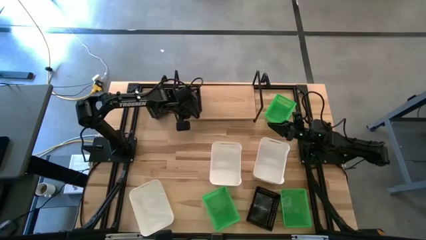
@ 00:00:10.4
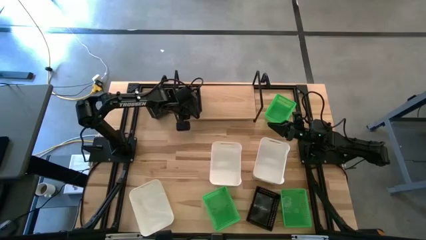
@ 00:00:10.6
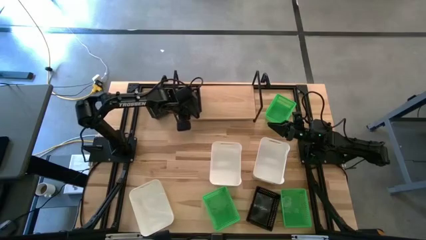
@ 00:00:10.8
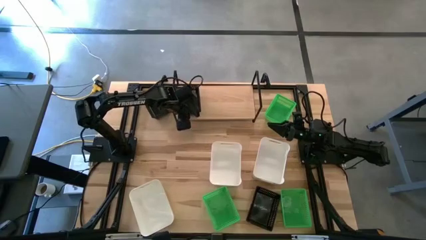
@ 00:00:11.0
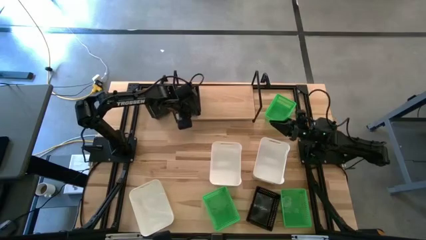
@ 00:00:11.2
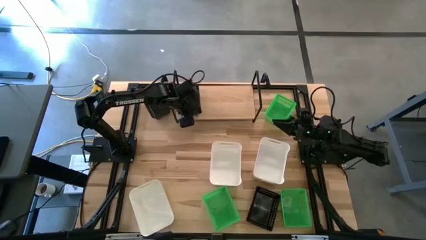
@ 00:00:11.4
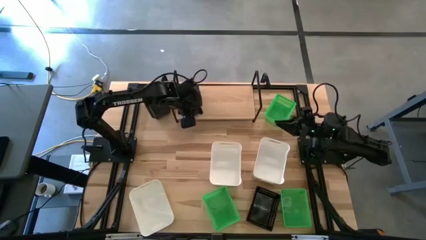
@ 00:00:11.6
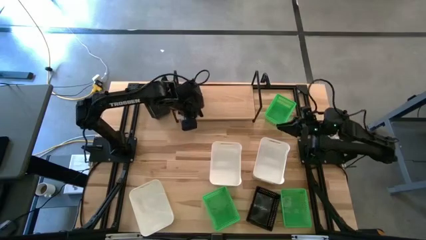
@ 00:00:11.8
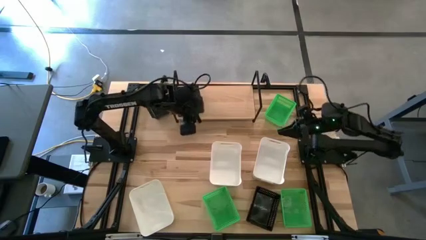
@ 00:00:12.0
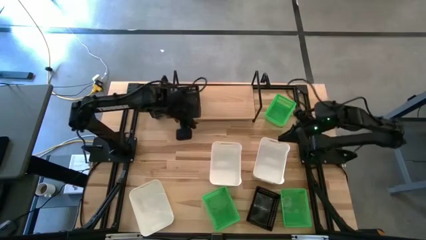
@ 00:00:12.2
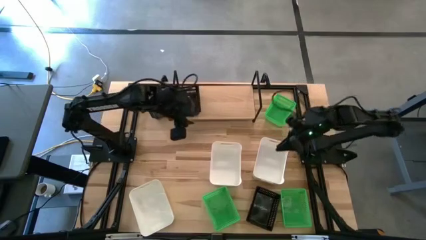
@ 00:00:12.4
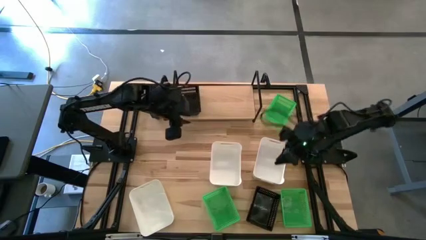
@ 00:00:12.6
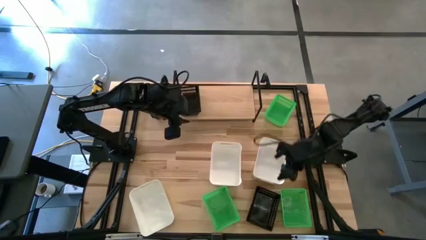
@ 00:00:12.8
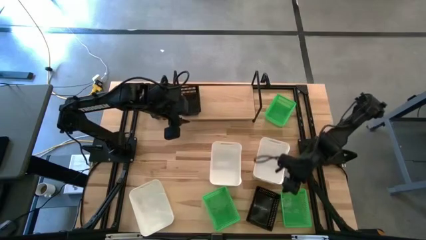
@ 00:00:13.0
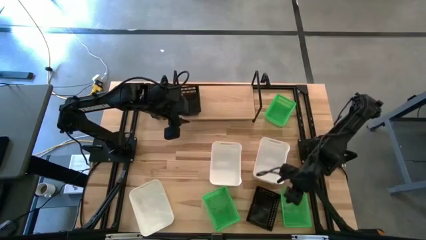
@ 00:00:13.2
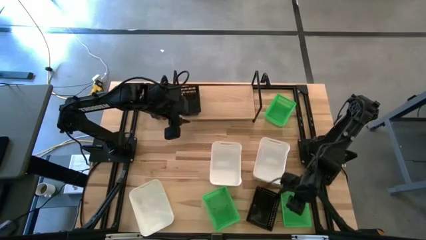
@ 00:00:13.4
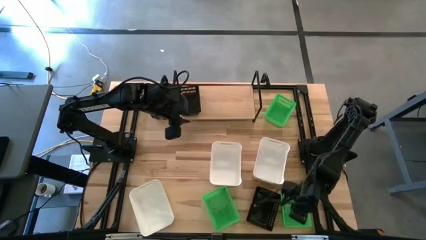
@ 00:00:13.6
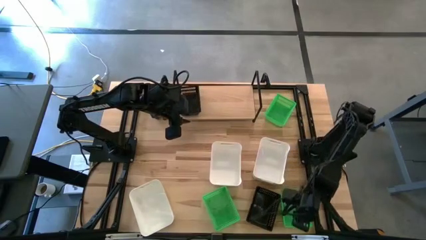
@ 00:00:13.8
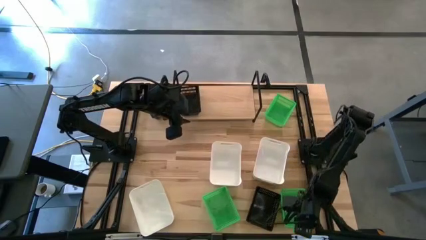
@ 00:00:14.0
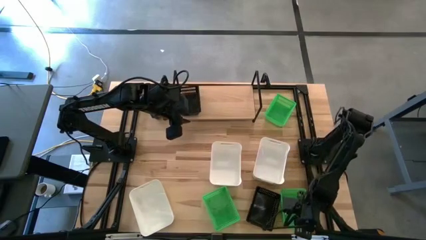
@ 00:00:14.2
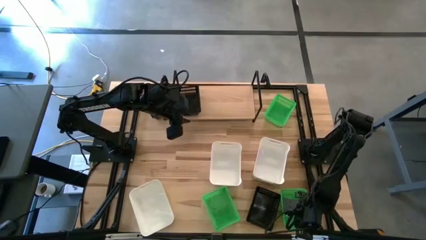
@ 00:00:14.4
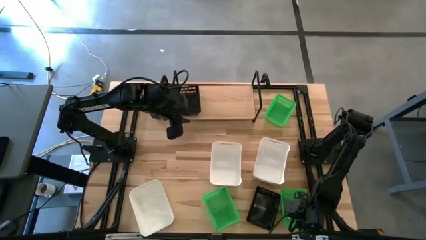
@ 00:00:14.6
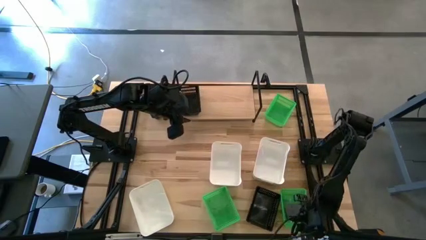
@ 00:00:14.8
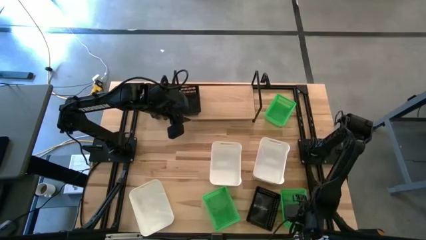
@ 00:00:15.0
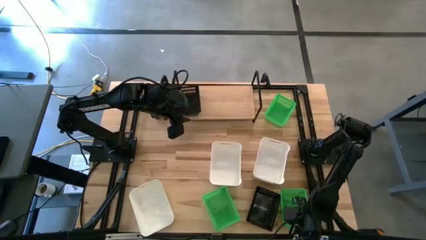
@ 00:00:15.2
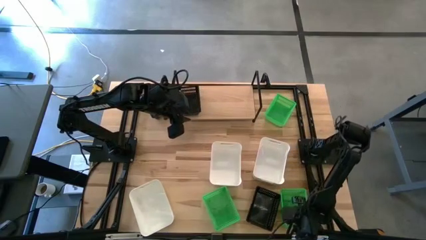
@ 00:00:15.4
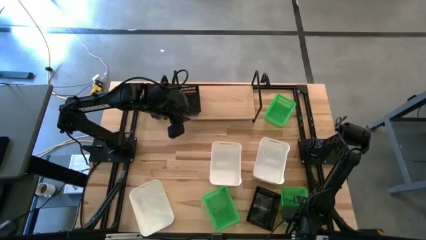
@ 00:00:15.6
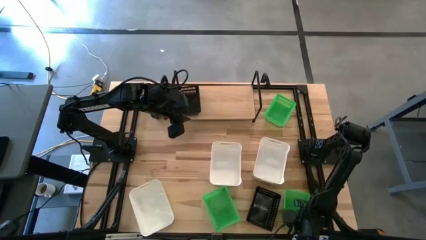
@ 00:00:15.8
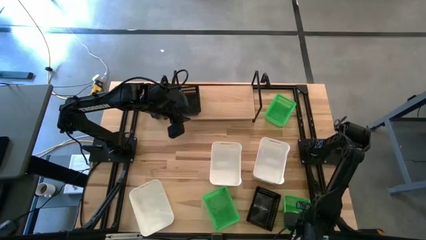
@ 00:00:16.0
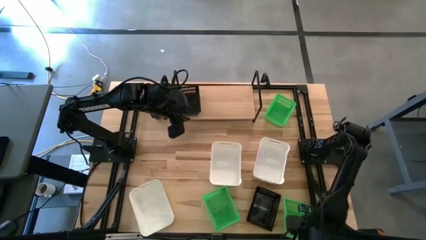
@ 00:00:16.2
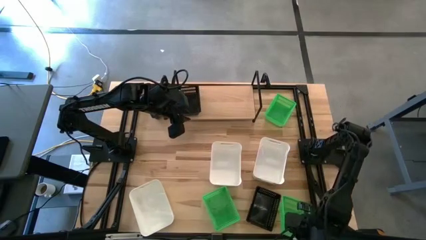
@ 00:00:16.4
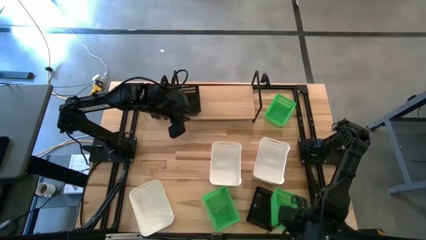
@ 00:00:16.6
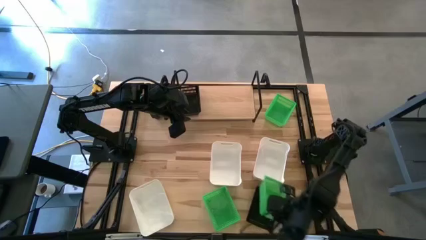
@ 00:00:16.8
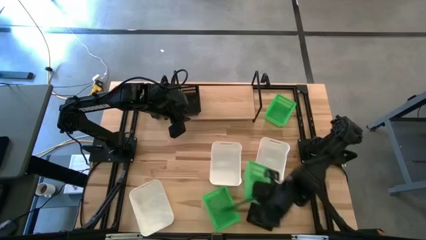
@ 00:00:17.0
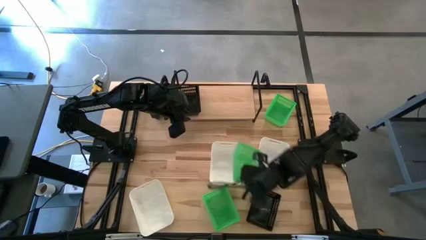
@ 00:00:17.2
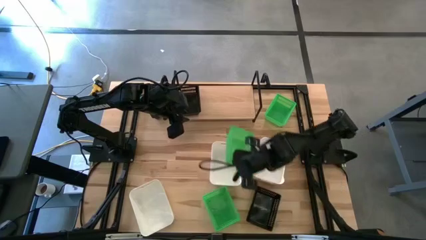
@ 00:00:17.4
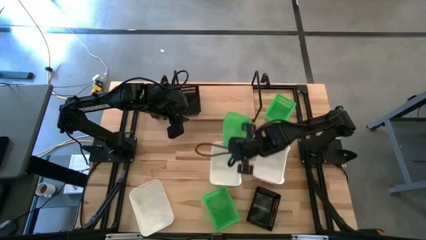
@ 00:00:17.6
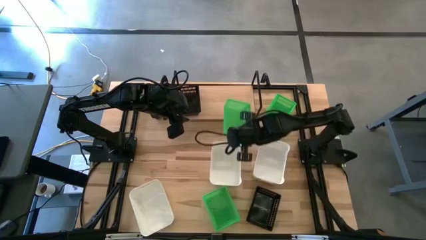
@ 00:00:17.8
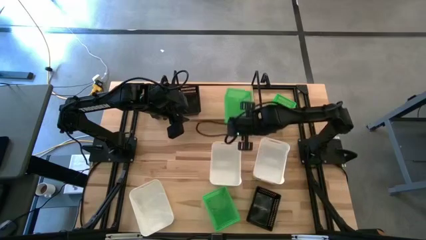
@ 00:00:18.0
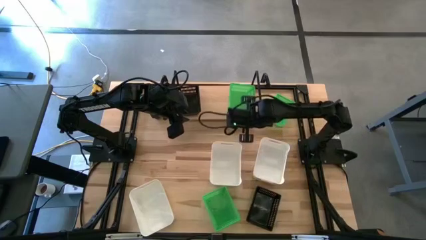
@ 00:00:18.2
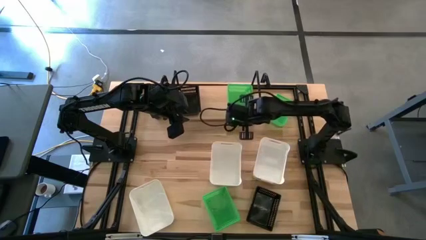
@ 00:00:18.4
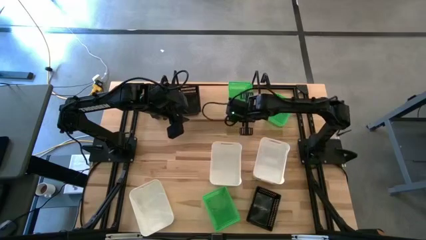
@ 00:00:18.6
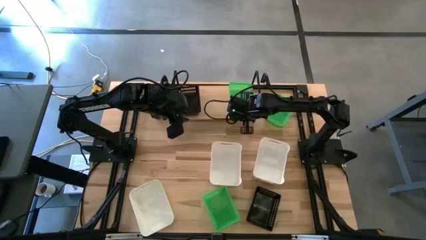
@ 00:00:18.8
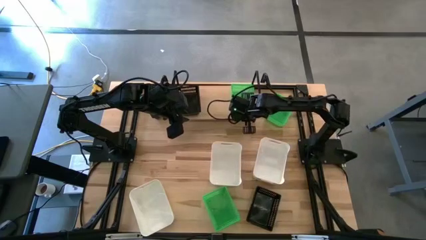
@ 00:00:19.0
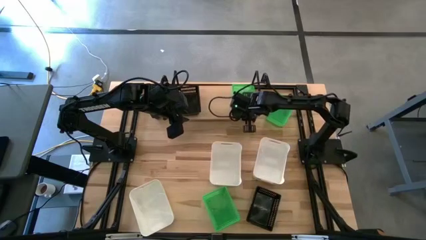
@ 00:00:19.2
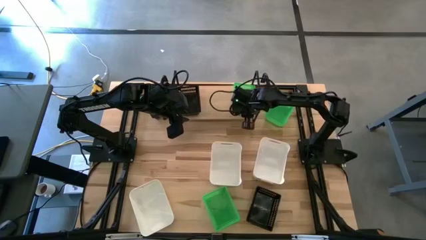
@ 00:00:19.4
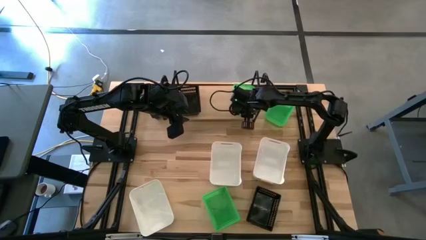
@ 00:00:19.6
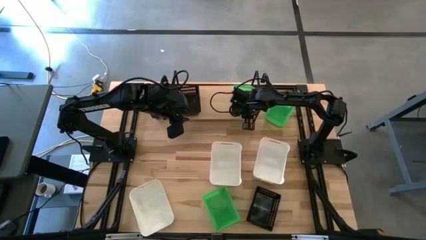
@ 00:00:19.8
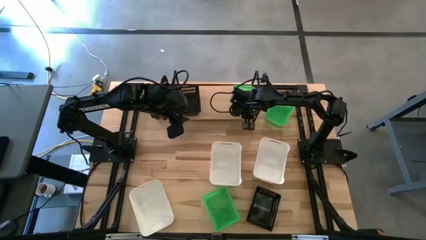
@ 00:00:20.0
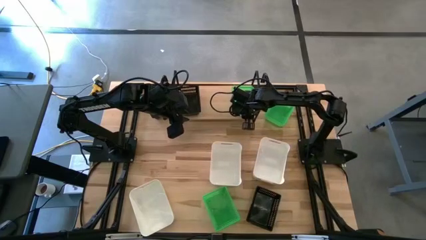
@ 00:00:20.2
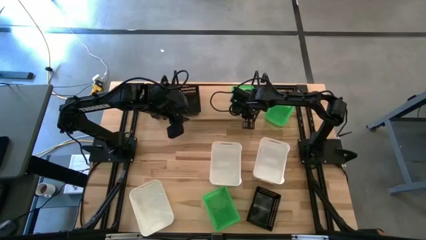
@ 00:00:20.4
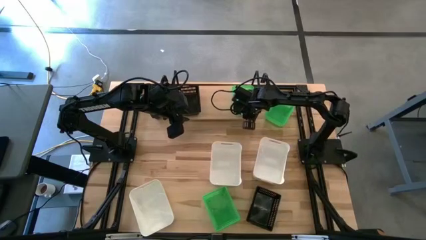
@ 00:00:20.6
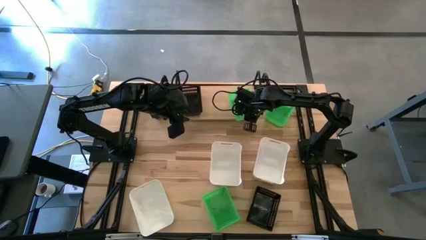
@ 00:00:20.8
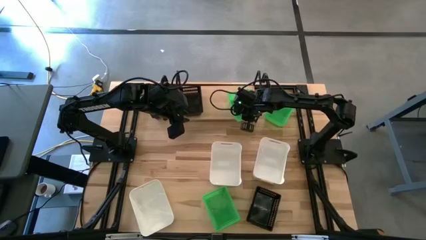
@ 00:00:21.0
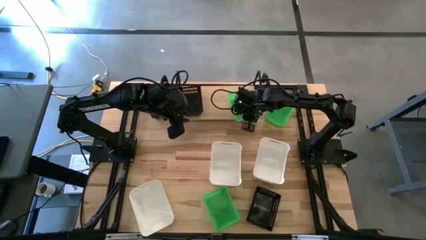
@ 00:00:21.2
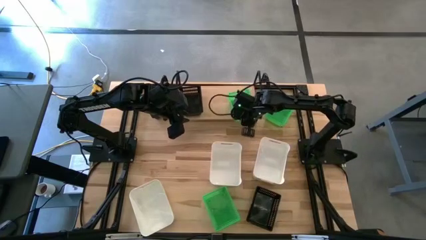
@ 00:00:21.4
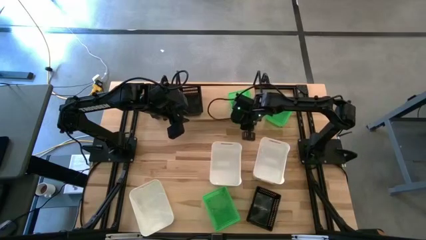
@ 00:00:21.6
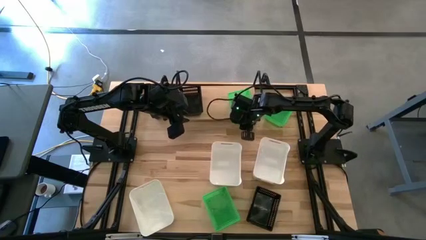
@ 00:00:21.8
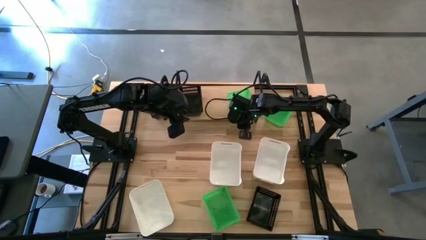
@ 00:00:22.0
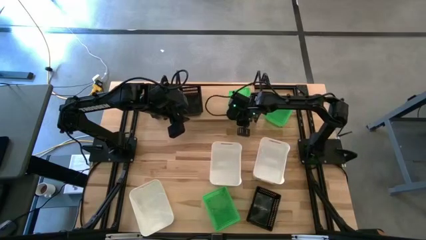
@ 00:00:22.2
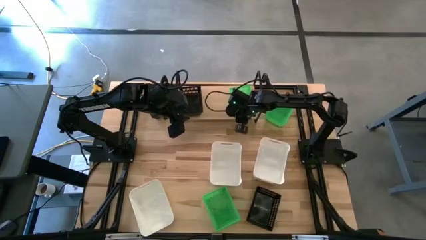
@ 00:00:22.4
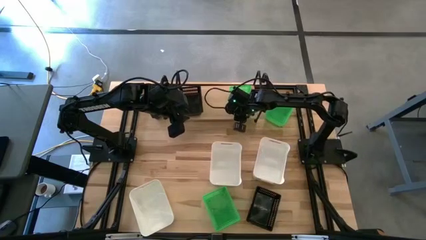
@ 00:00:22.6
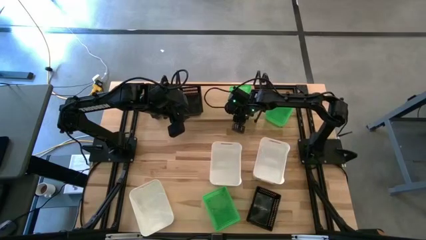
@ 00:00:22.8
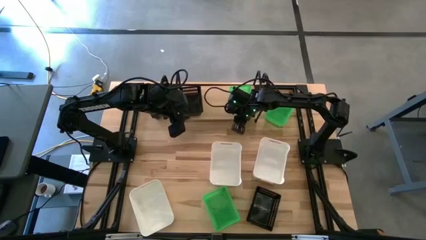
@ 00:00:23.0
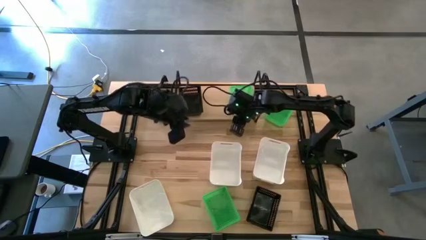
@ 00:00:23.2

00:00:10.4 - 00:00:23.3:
Task: Stack baskets on shelf by color
Put the bottom right green bin on the shelf
